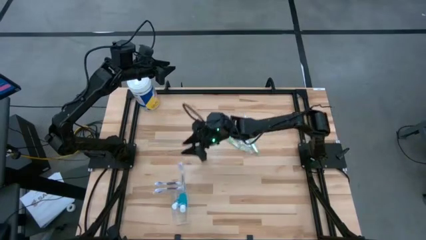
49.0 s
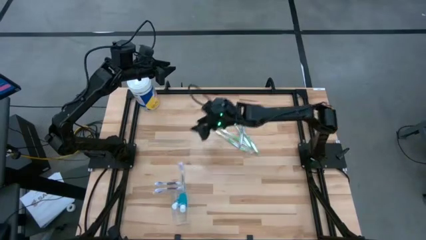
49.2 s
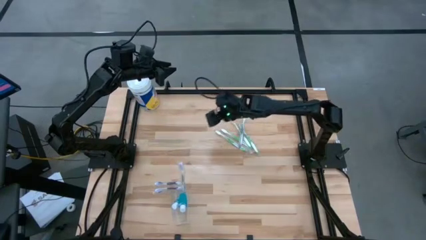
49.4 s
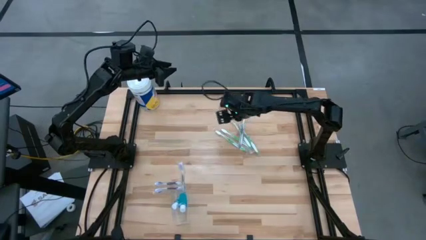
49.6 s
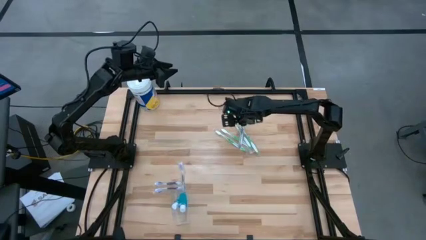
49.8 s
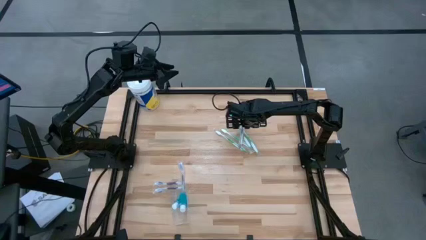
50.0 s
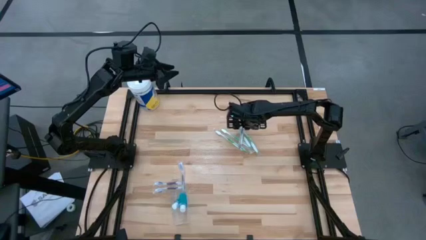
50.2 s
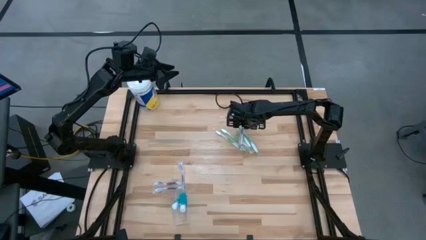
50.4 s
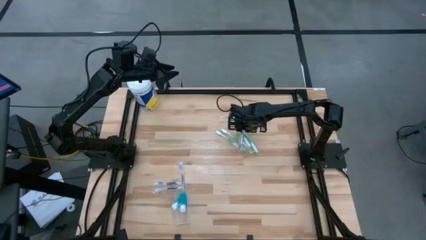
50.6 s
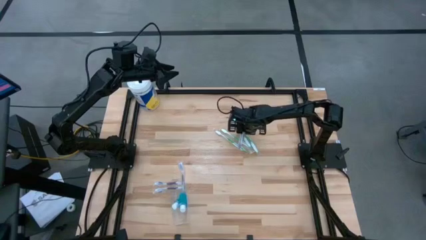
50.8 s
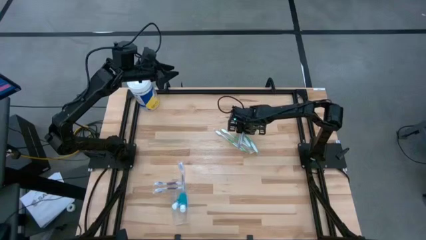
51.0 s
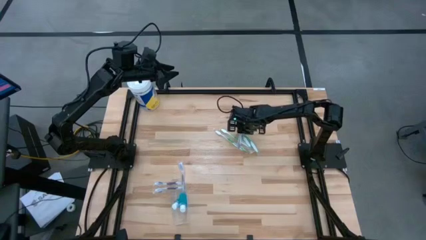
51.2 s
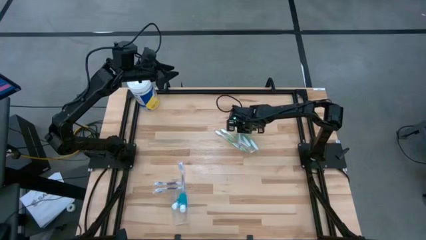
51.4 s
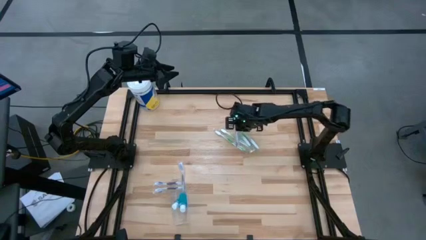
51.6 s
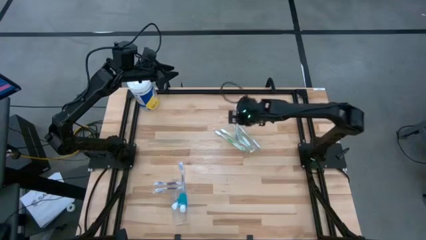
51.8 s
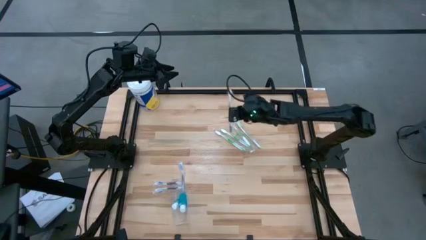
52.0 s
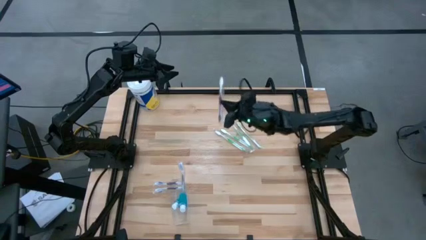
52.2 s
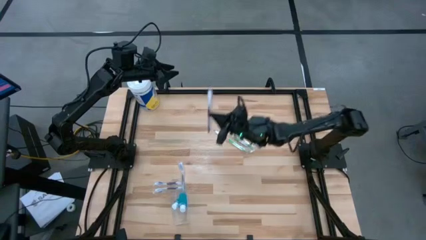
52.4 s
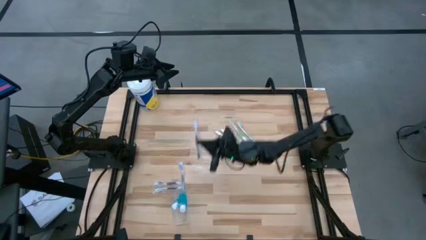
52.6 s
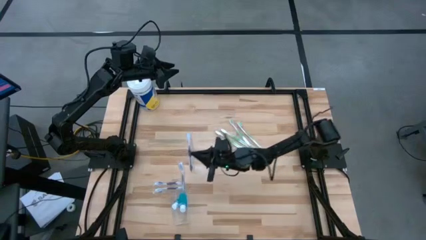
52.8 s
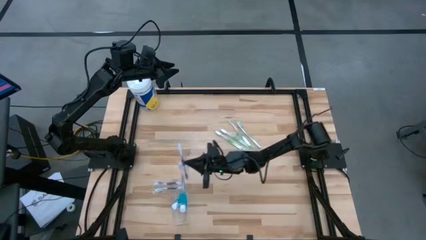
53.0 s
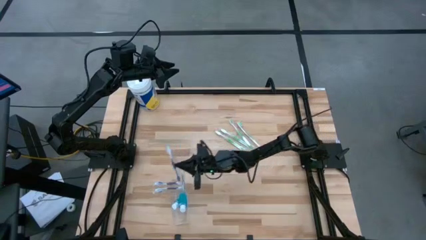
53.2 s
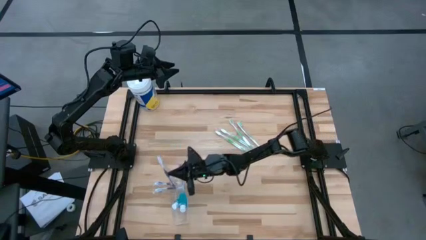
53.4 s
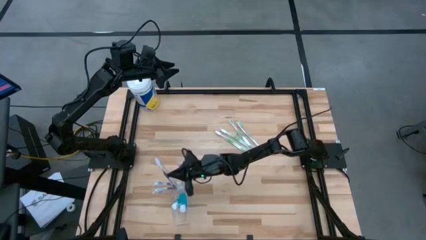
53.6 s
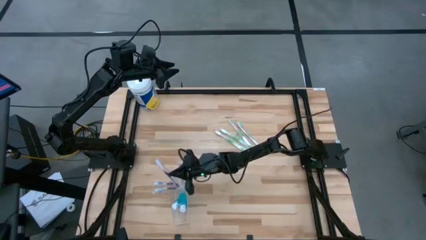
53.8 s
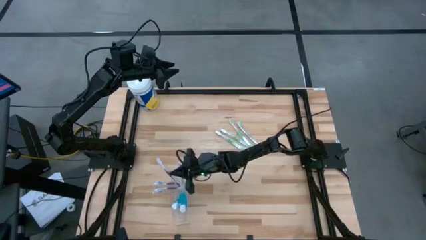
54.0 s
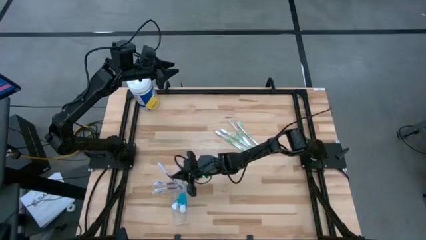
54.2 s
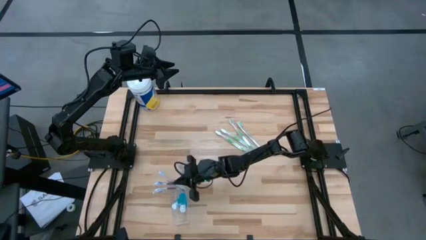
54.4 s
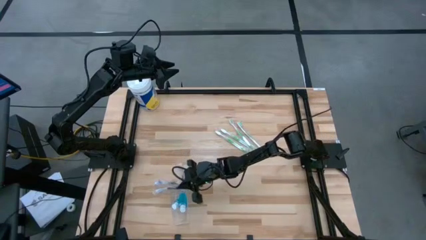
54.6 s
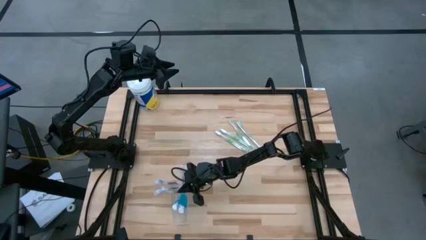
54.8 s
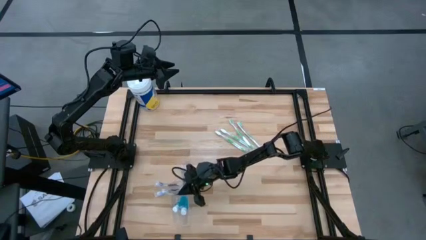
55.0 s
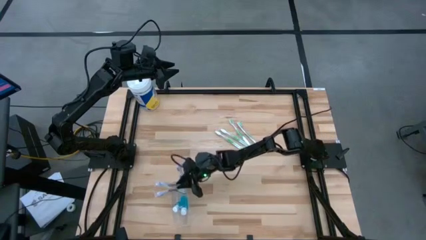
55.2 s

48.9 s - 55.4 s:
Task: Pick & Place toothbrushing station
Put the purple toothbrush into the transparent organizer

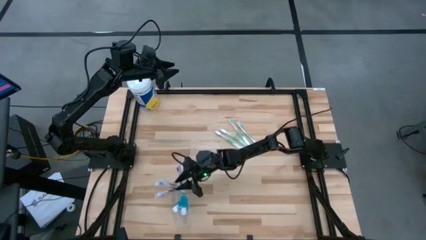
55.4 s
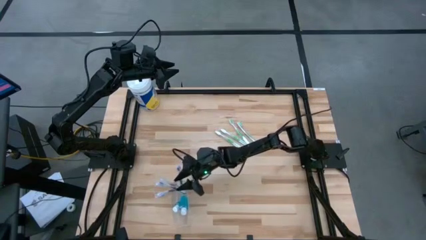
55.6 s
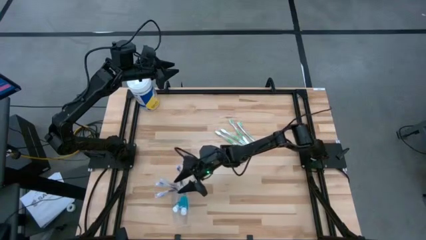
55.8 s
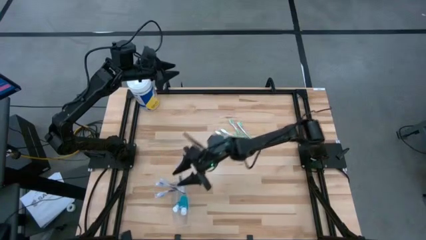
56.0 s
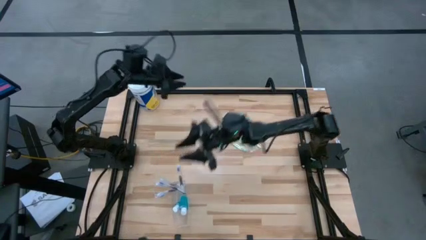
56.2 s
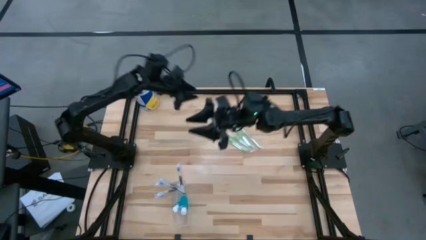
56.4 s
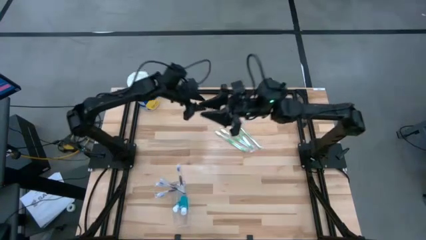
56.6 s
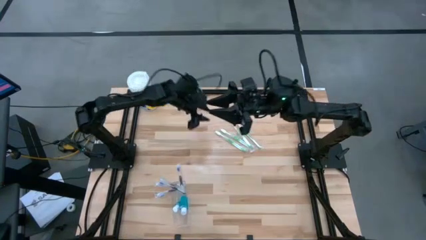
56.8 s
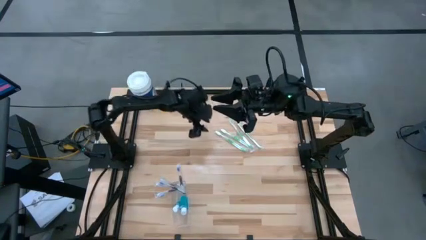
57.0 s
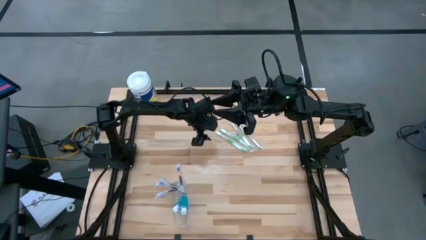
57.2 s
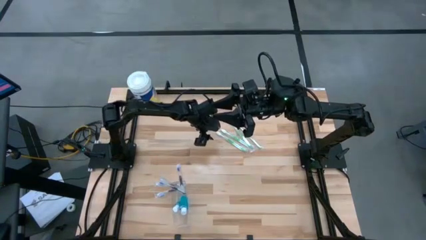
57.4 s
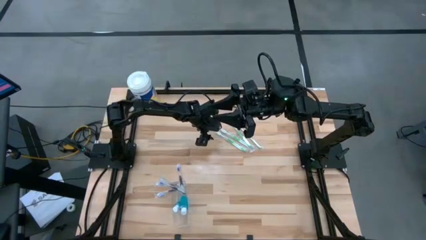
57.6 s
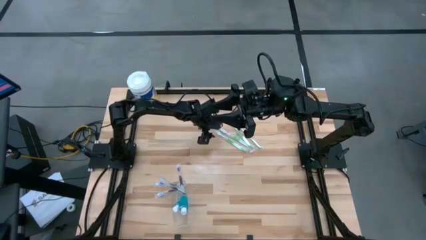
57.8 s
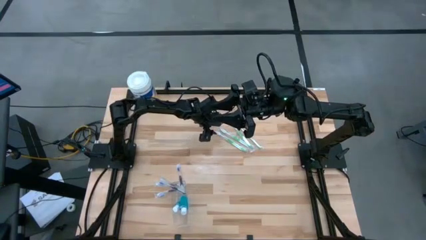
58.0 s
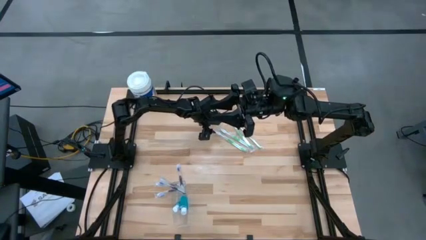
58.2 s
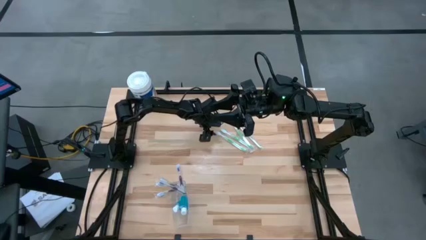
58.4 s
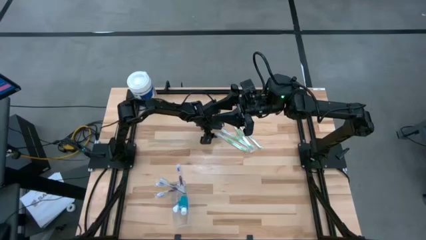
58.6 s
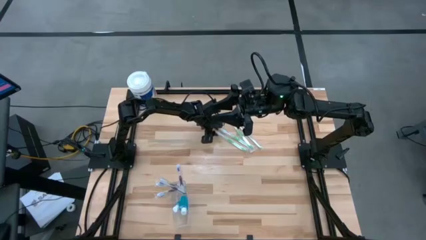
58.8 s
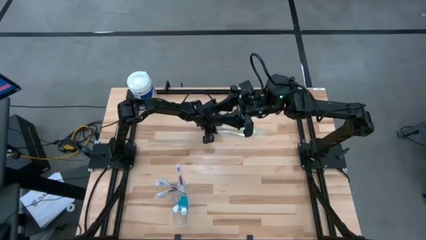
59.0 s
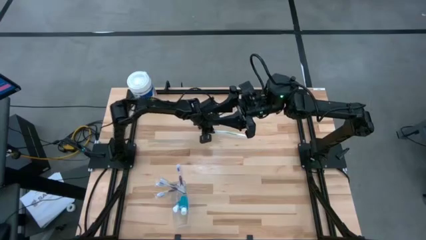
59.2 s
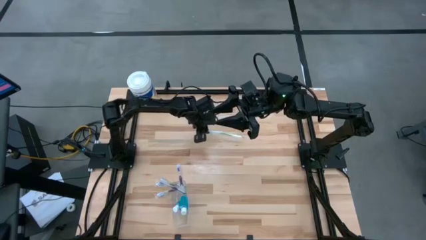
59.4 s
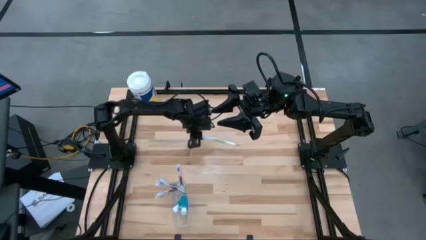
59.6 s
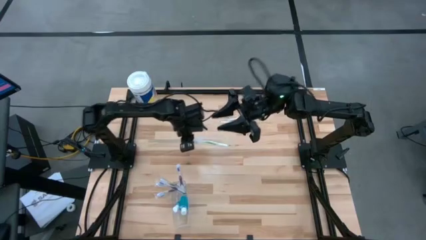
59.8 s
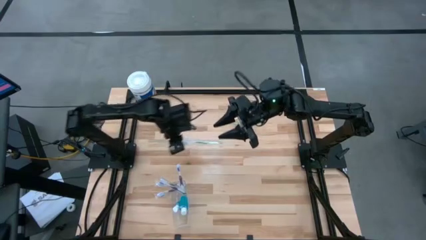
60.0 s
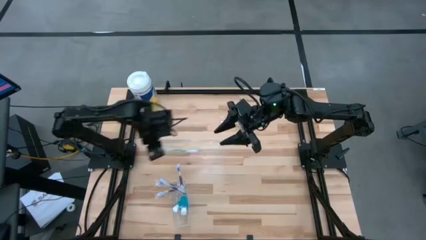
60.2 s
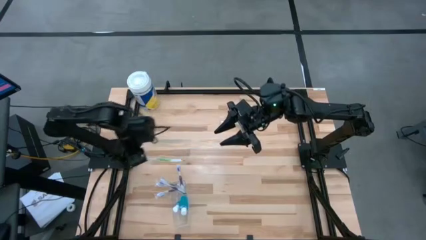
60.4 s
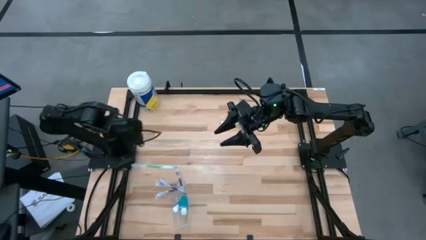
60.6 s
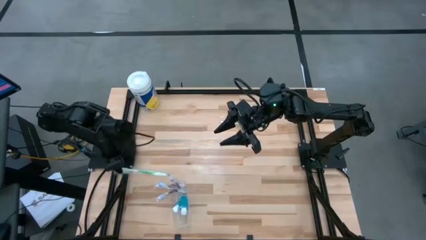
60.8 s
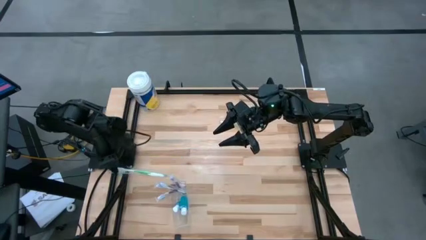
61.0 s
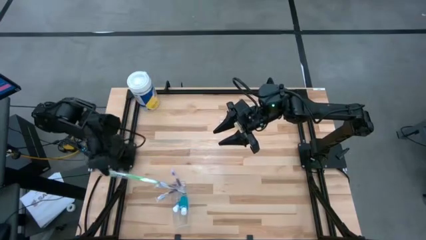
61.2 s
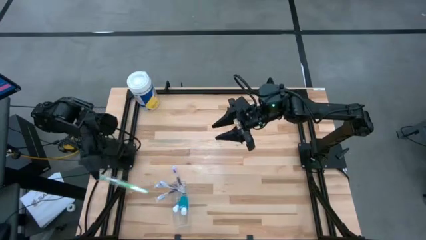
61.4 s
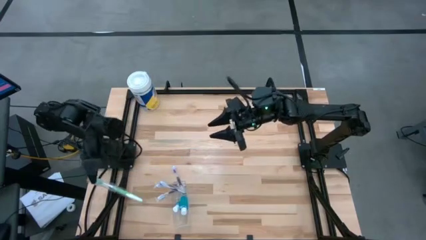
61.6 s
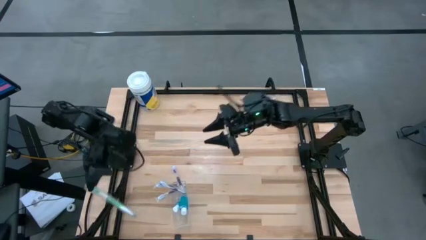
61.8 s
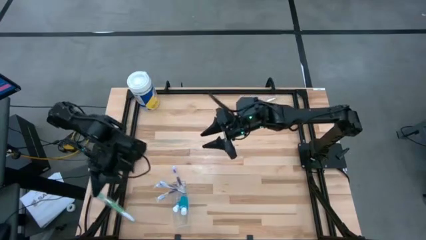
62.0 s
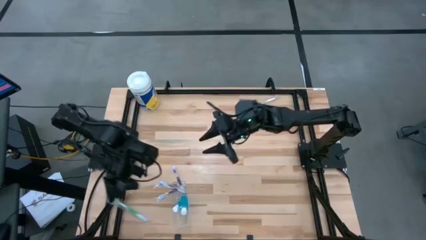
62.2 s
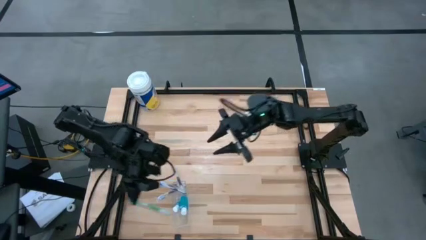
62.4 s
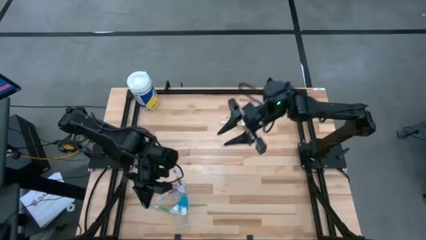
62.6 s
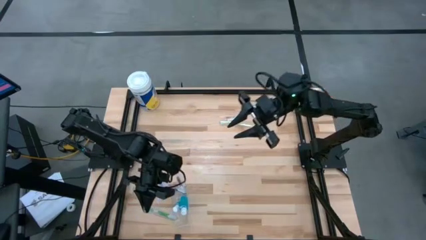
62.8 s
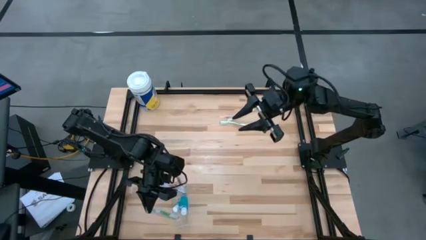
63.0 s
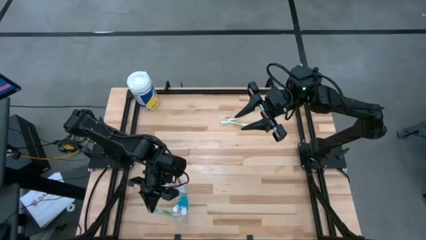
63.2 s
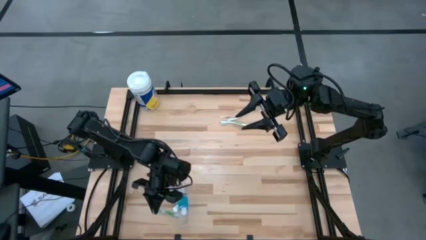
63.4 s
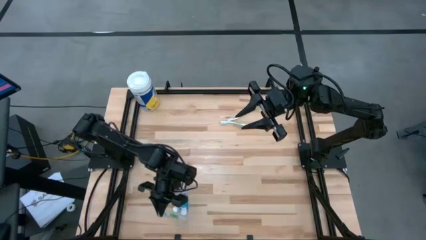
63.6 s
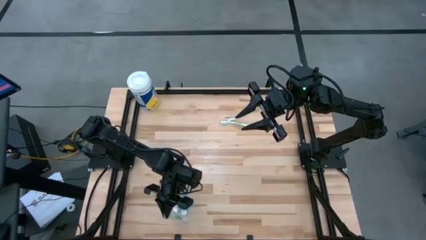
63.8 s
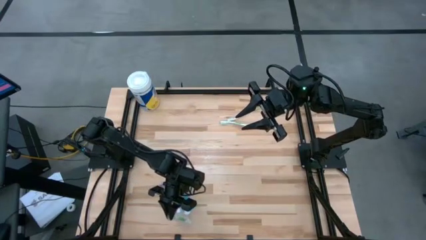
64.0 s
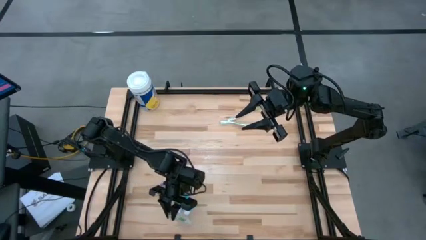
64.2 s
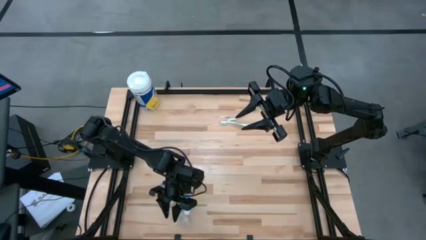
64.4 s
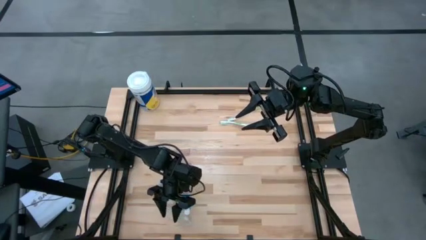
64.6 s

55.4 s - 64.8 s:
Put the green toothbrush into the transparent organizer

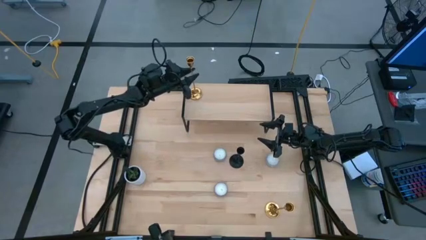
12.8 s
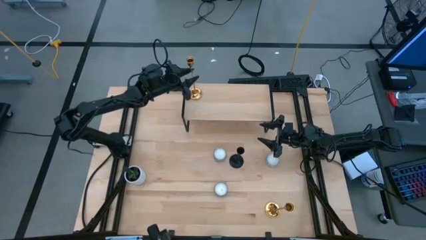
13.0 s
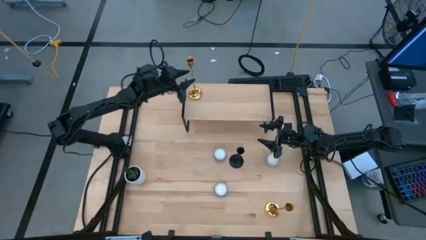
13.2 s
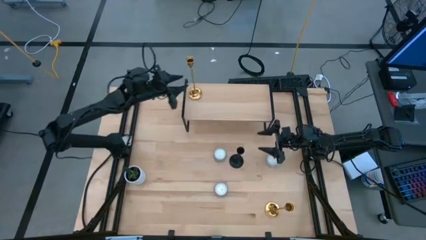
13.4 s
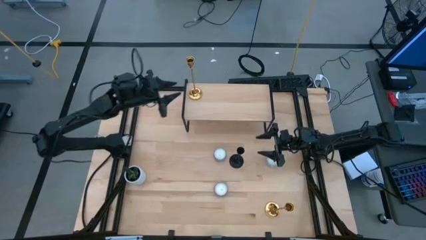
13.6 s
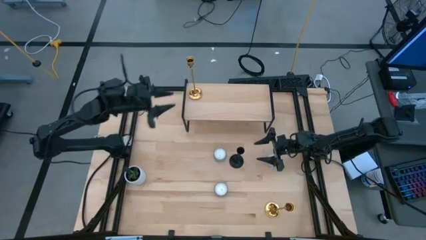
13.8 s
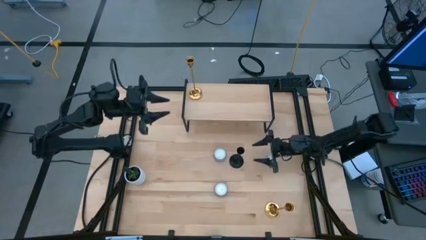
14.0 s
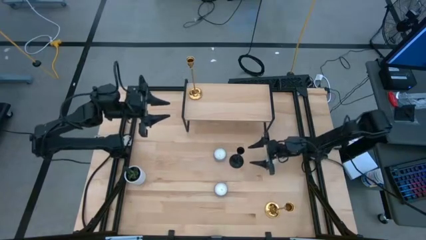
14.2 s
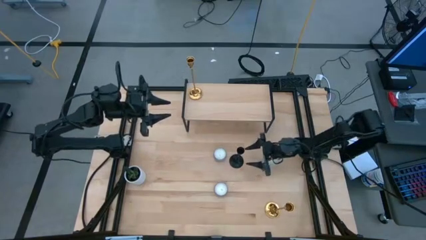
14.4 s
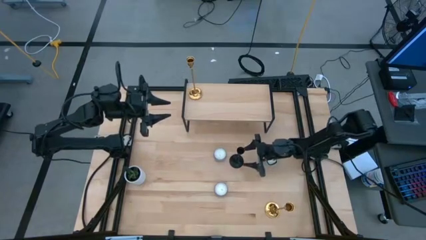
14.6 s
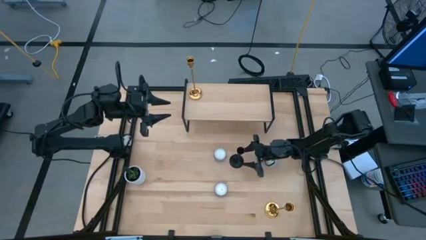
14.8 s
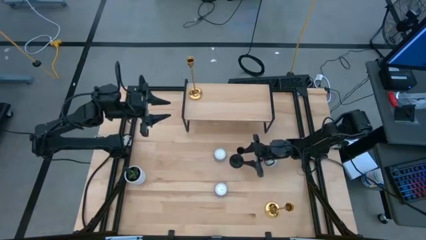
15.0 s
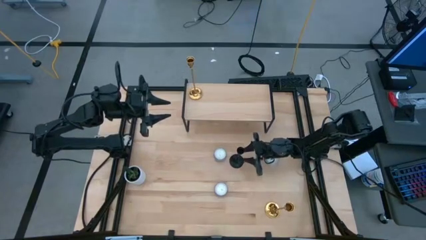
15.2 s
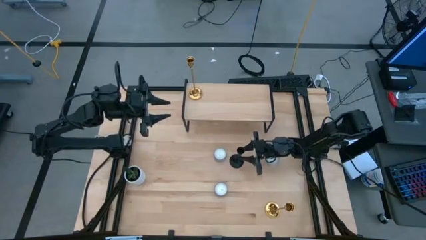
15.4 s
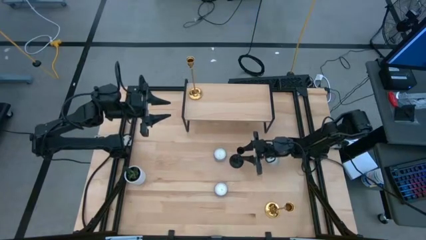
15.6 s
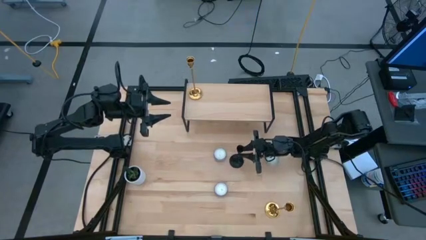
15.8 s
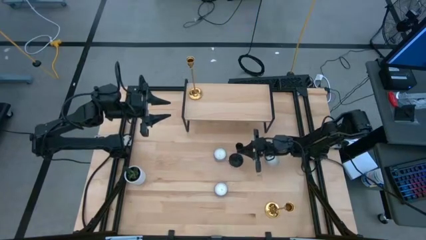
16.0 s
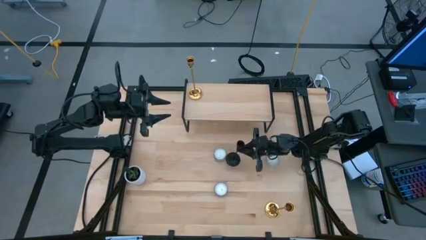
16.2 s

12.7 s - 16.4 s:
Task: Pick & Place candle stick holders
Put the black candle holder on the shelf
